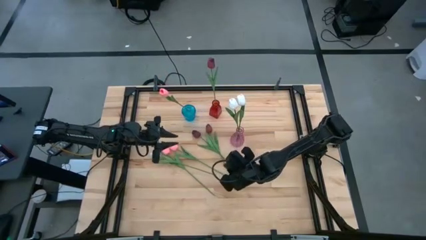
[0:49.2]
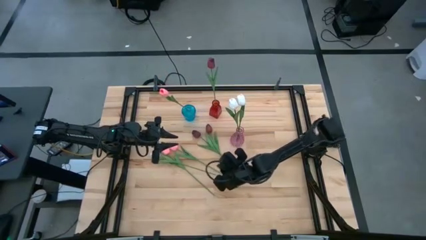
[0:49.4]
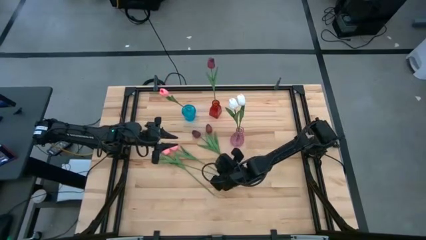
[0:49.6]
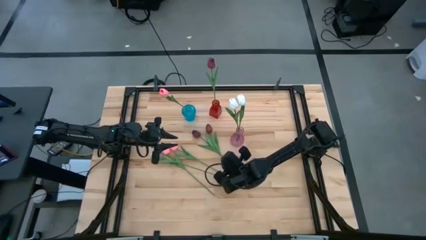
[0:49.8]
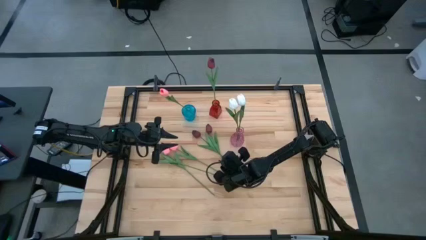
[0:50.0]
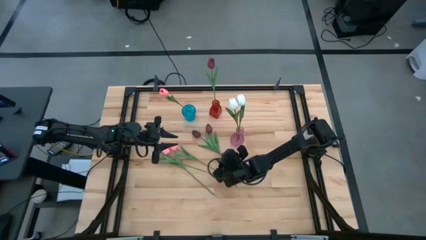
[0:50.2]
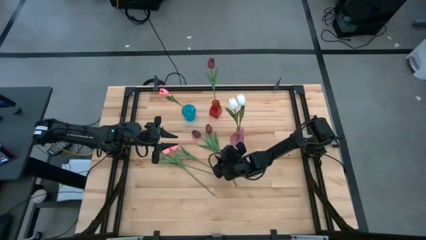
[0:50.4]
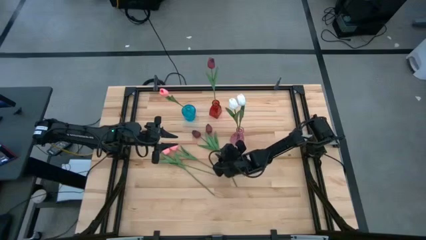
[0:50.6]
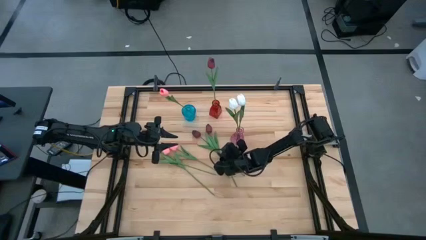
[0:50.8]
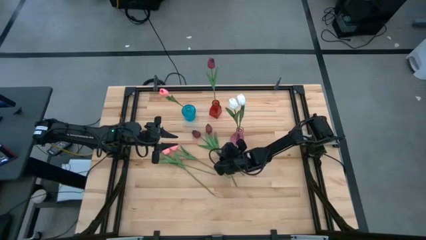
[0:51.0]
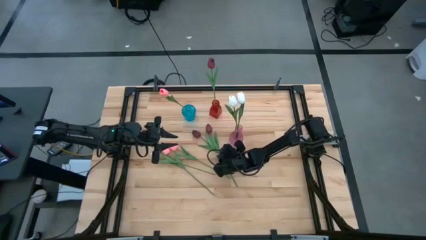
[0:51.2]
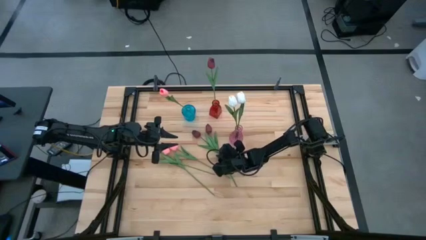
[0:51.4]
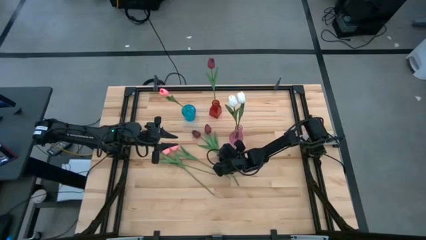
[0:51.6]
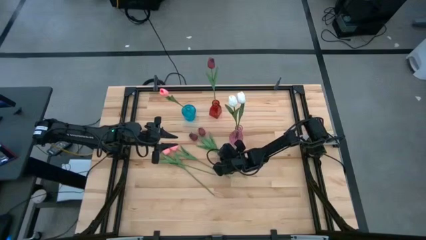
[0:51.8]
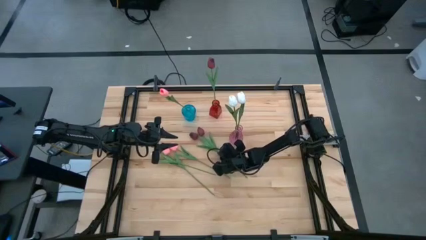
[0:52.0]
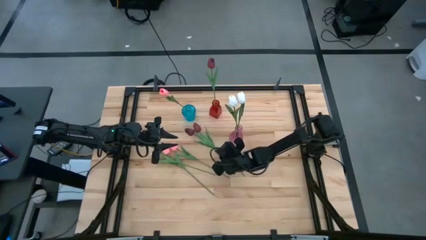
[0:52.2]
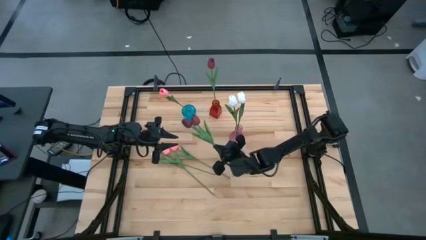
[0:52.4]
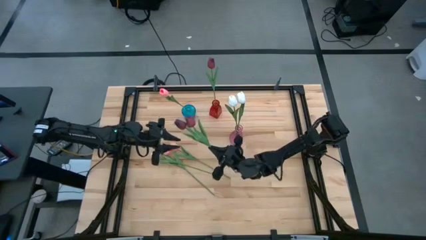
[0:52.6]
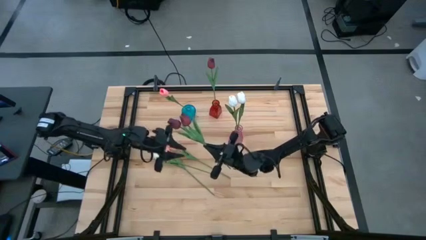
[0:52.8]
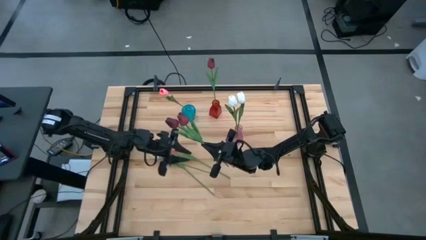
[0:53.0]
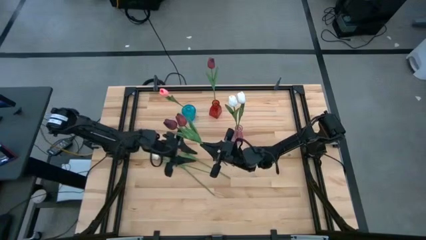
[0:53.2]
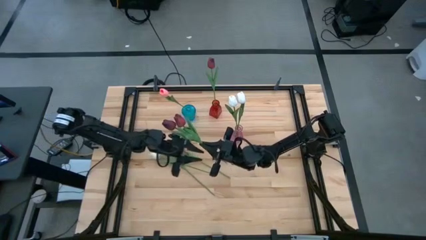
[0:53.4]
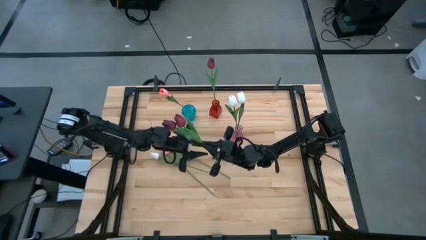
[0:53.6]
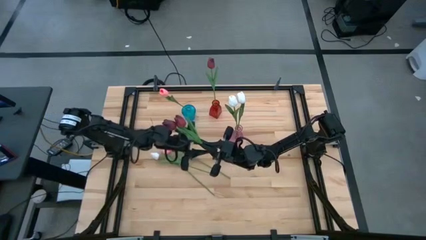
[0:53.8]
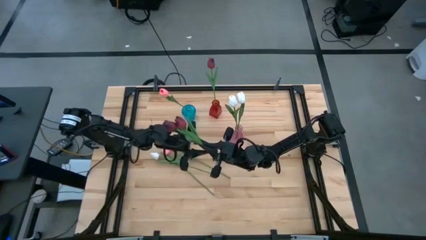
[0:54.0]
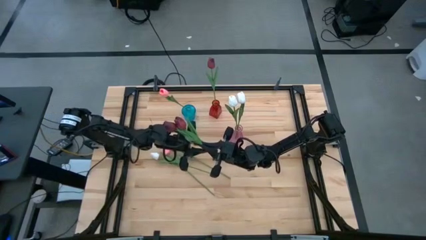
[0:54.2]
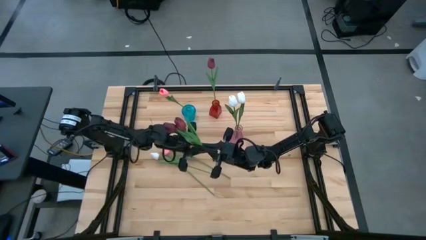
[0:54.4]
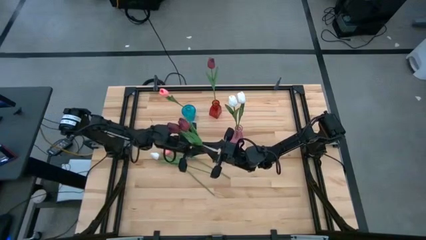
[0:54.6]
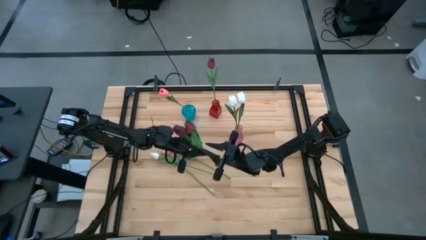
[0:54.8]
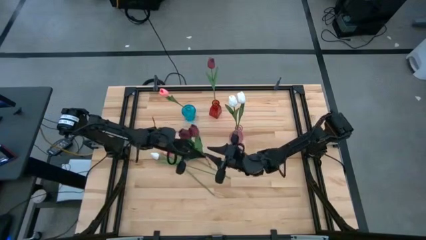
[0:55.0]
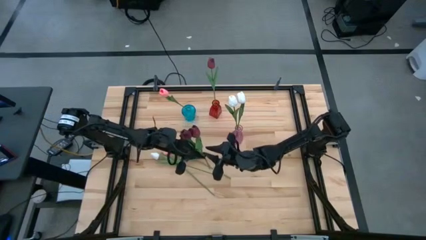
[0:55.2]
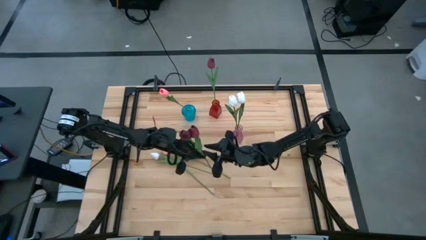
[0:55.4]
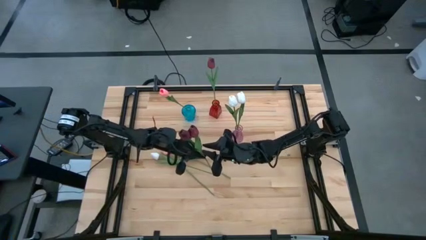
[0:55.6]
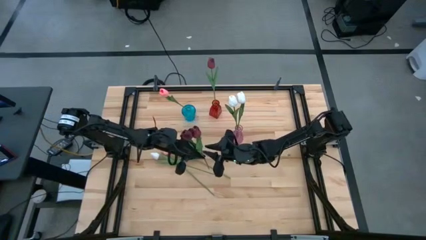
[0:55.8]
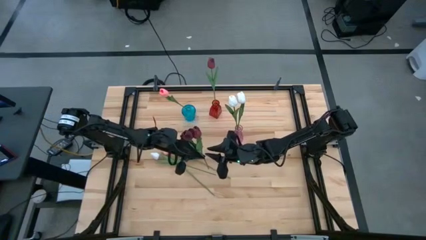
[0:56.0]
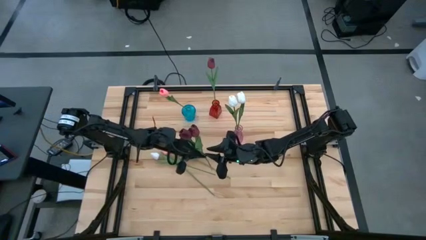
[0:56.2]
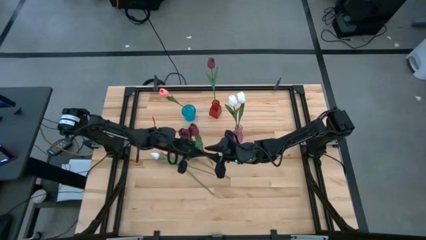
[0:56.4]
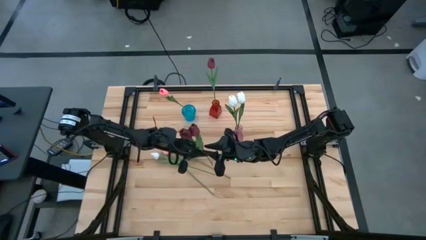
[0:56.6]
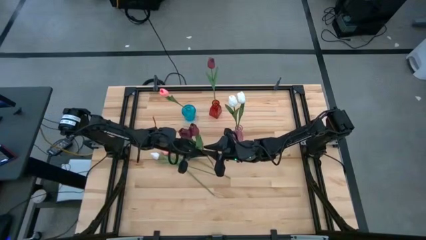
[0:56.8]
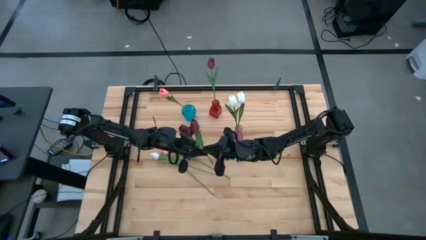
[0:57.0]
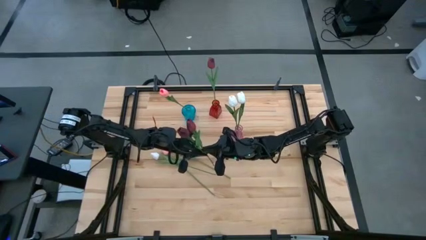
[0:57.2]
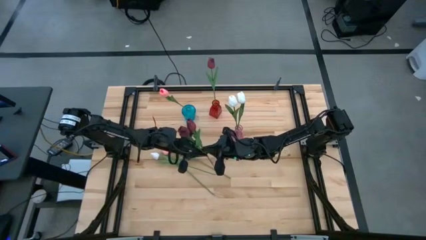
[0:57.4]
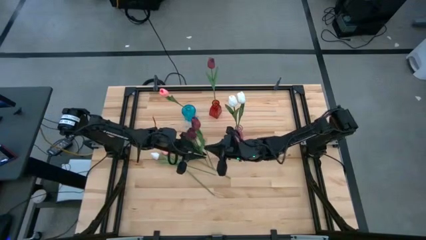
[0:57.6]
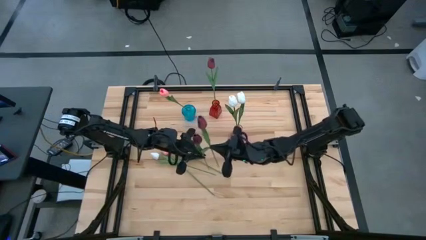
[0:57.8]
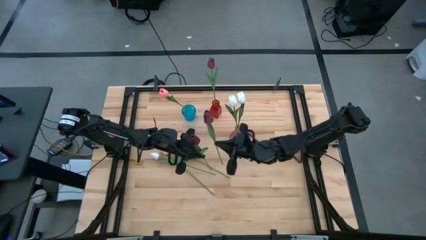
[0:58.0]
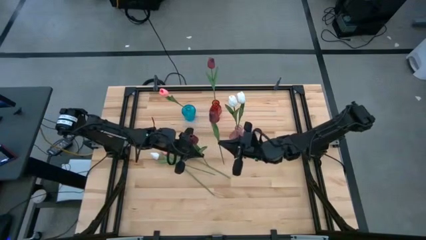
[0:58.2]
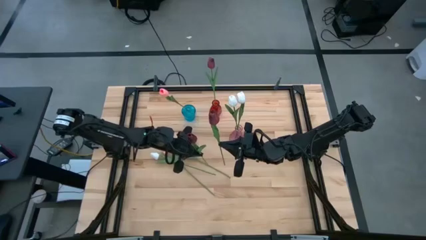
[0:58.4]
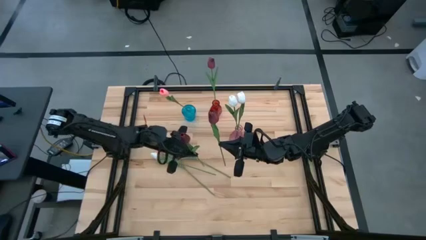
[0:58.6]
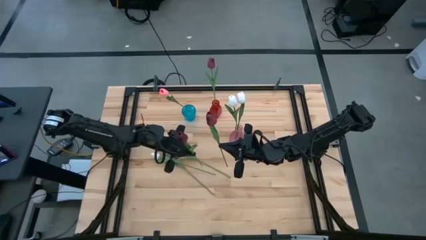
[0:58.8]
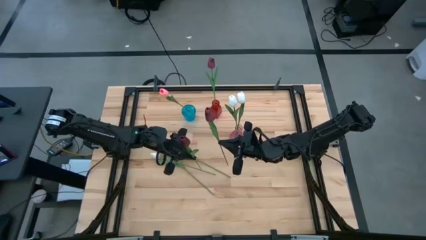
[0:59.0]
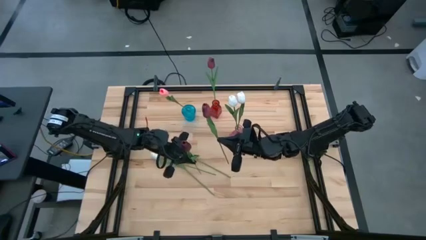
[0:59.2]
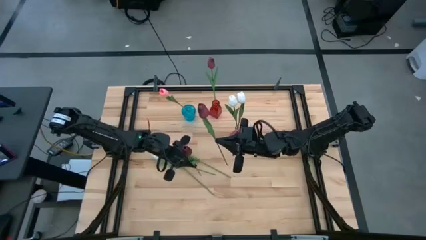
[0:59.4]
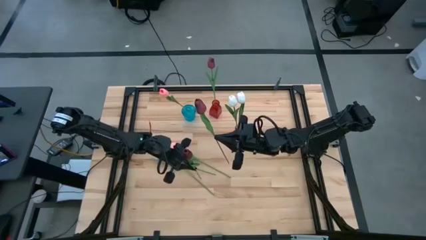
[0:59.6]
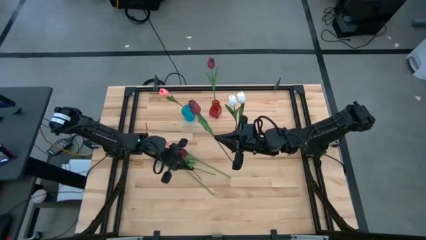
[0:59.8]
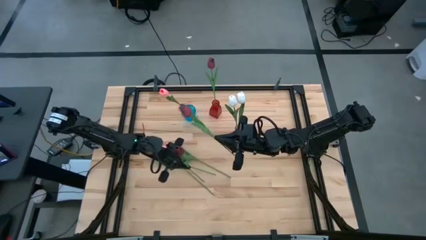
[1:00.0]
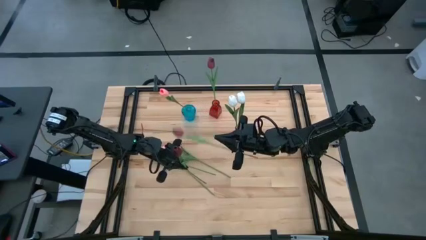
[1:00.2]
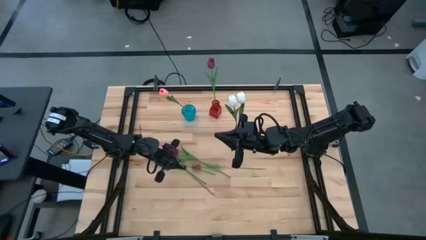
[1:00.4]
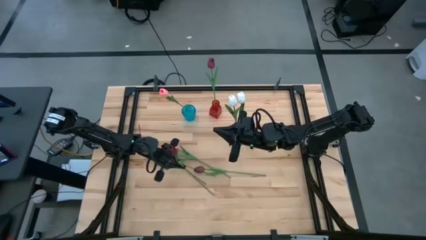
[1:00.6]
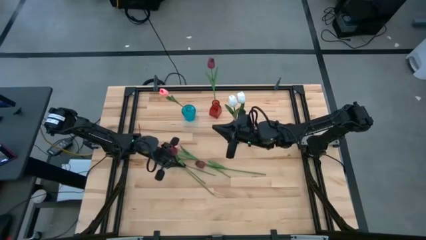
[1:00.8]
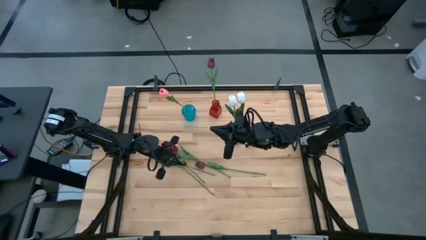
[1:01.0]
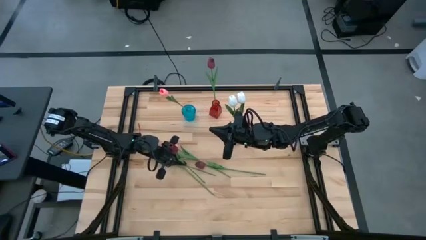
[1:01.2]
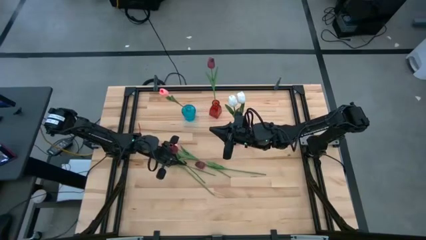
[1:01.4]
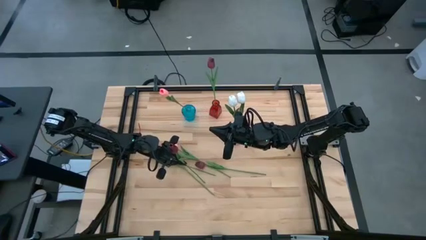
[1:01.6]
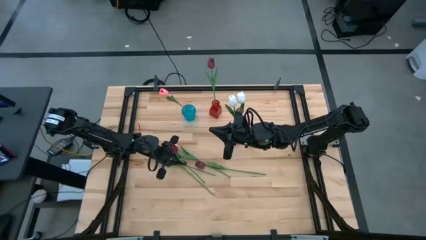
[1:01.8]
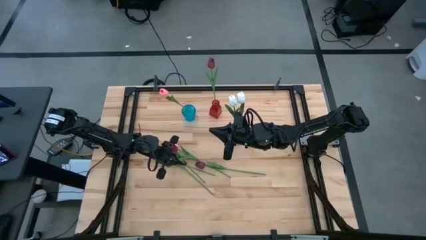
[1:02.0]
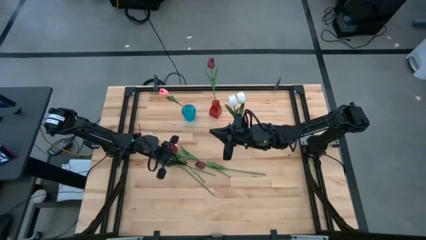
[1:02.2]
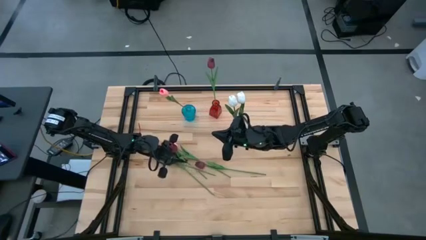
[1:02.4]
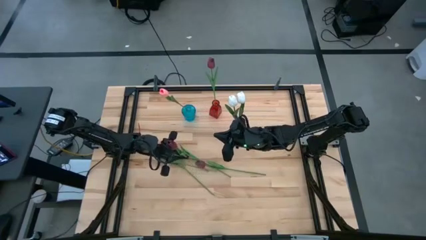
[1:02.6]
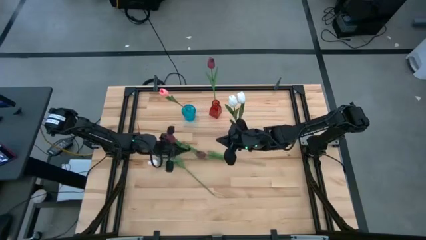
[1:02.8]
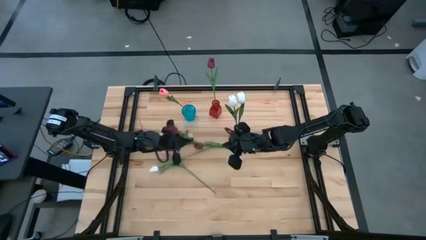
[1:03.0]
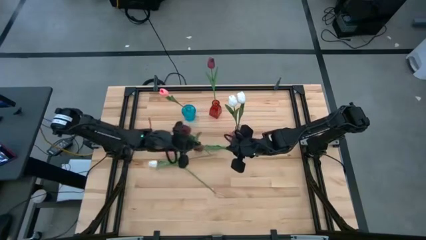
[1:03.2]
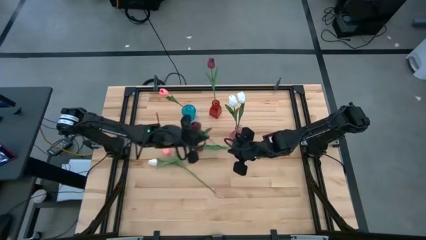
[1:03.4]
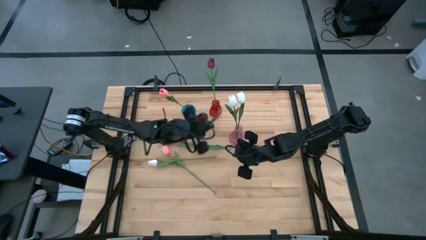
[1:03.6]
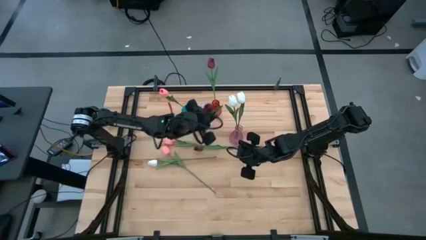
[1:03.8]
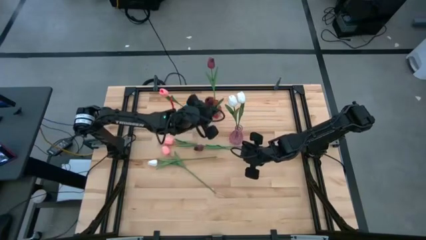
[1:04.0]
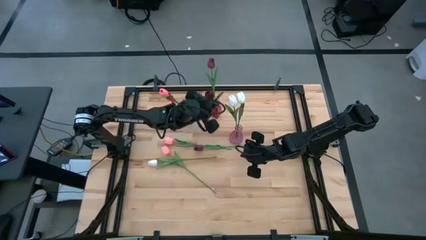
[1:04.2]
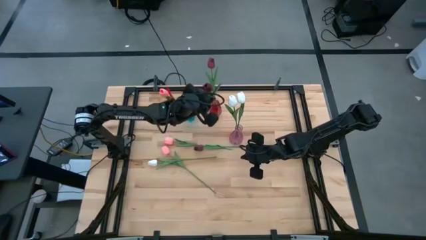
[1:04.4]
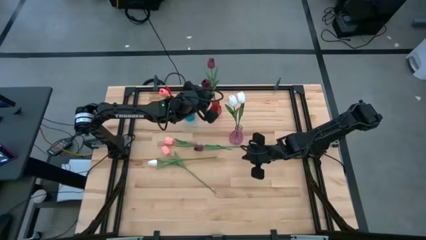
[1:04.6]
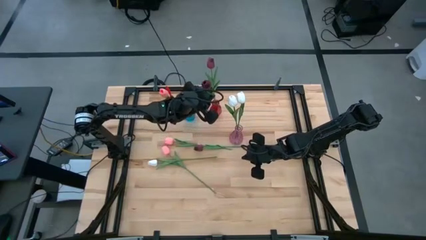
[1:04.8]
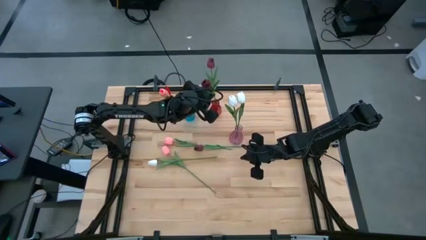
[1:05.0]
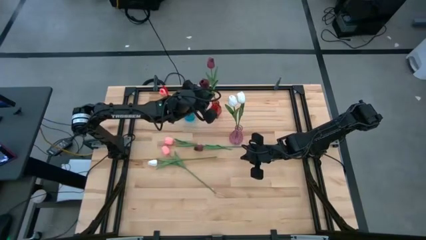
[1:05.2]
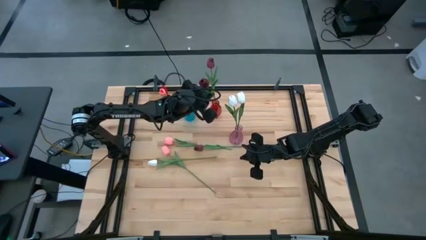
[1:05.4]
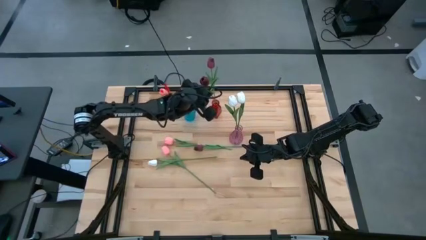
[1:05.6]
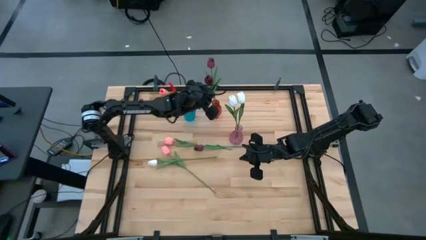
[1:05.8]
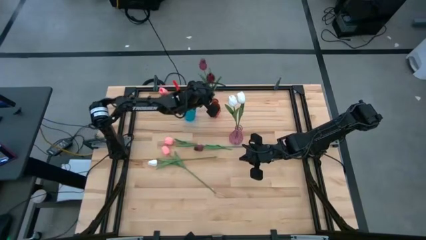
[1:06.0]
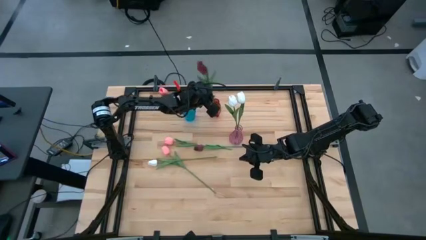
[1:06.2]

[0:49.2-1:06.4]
Task: Sort flowers into vase by color
Put the left red flower into the red vase
